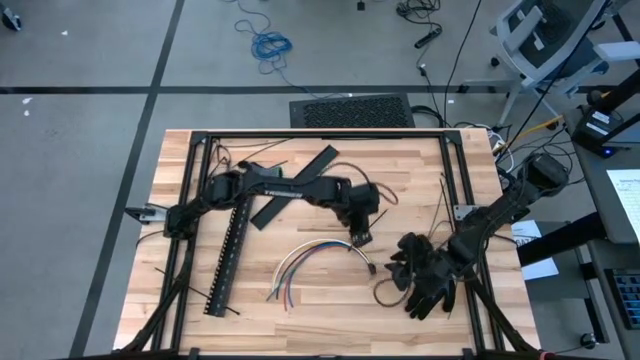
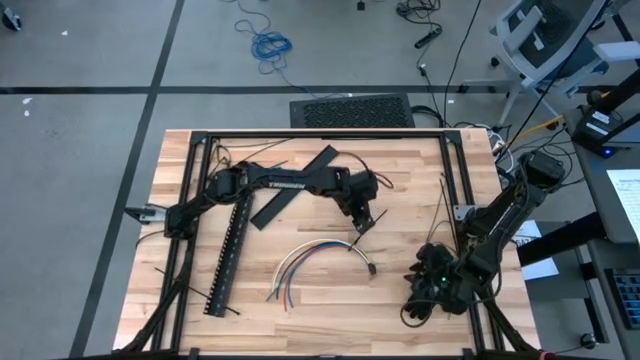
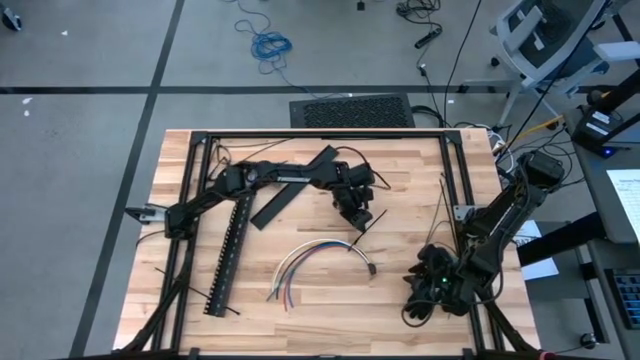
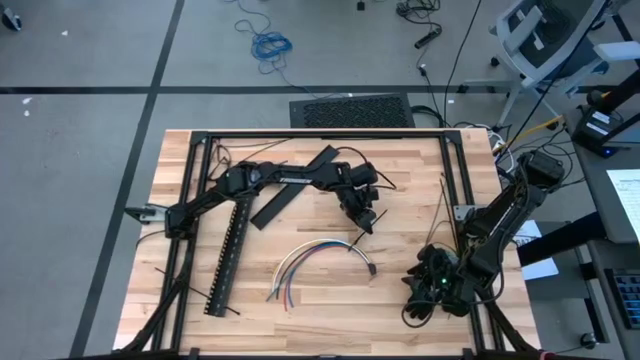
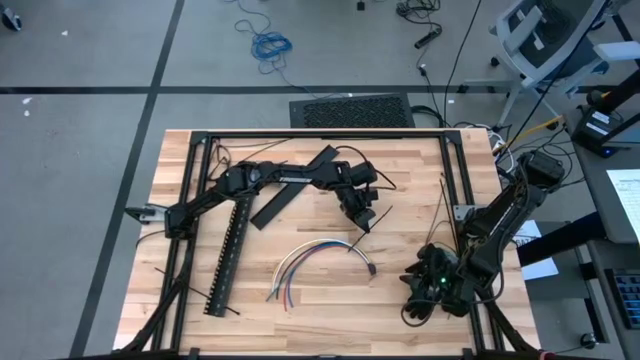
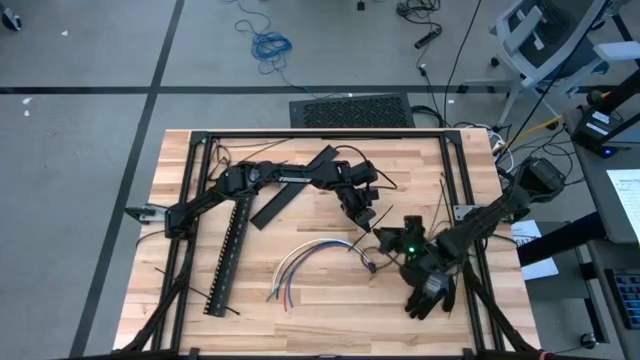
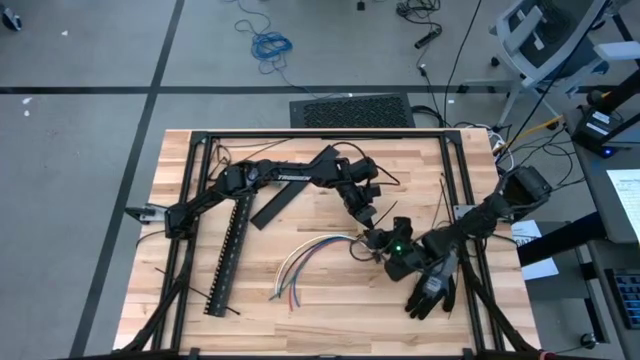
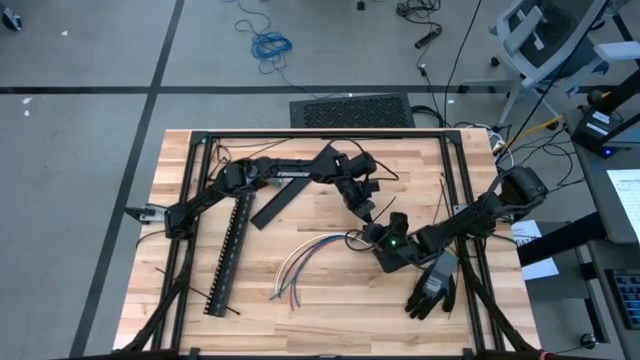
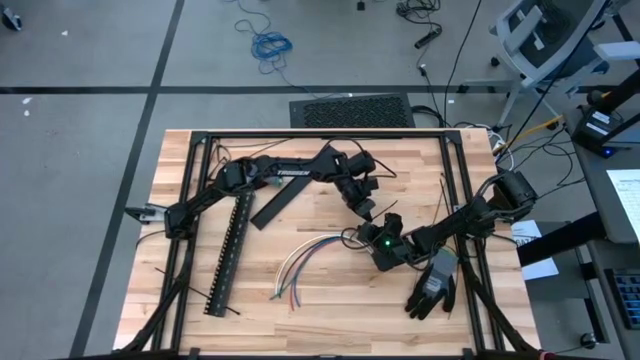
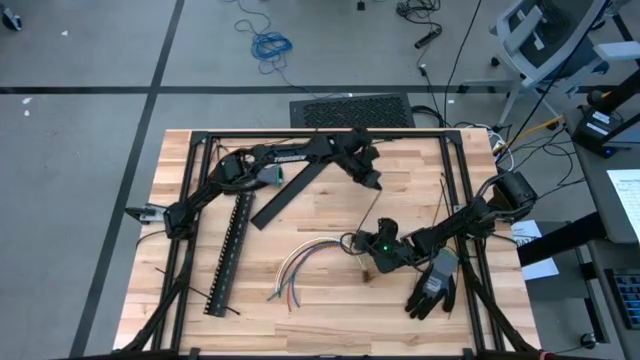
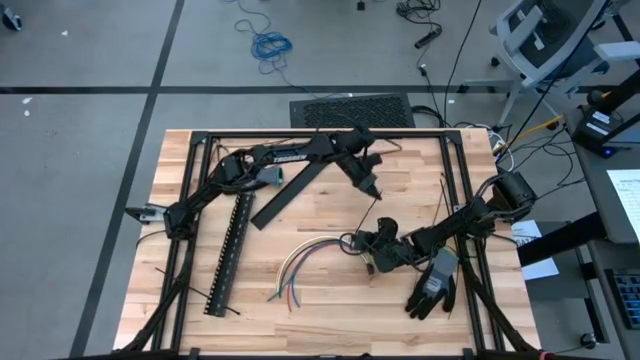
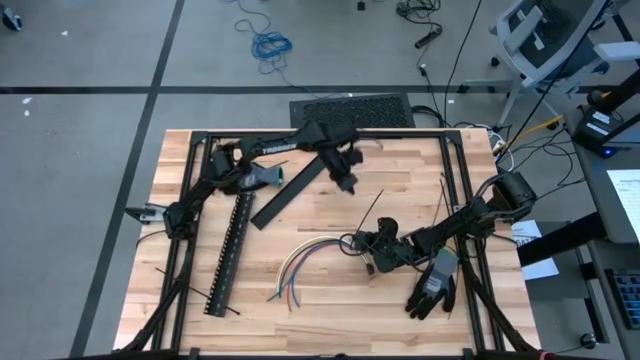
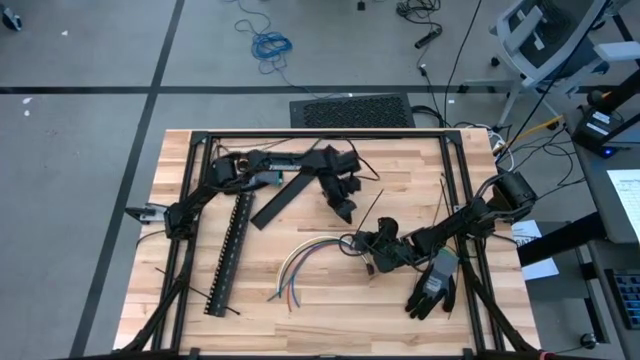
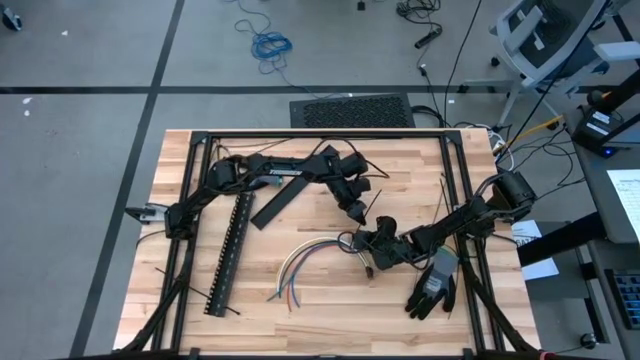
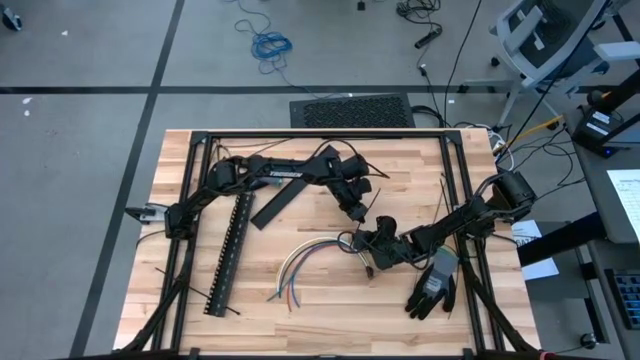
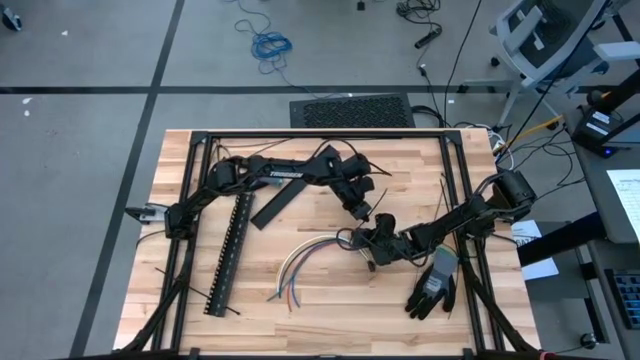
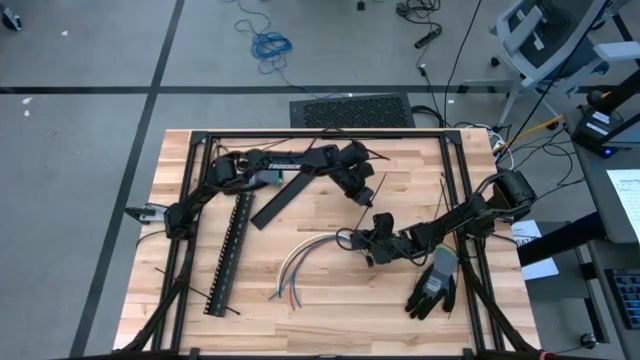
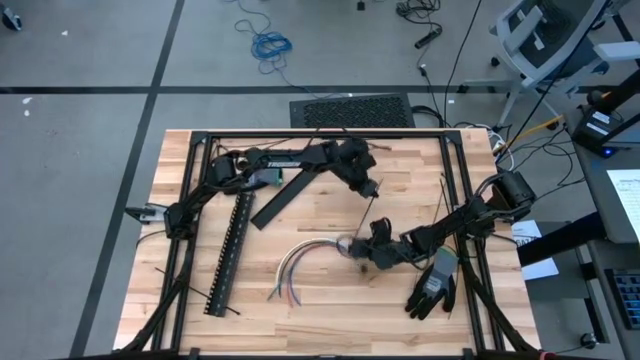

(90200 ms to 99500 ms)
Task: Ziptie cables
Wrap the cable wires with a black zip tie

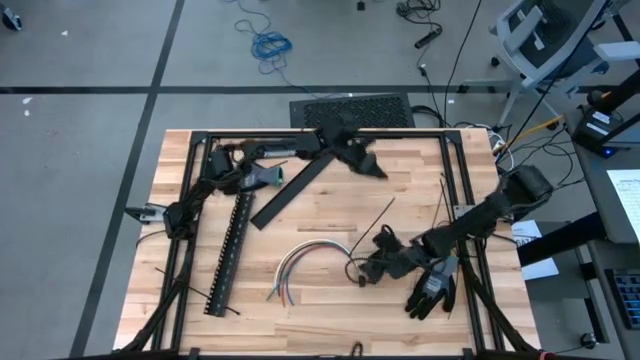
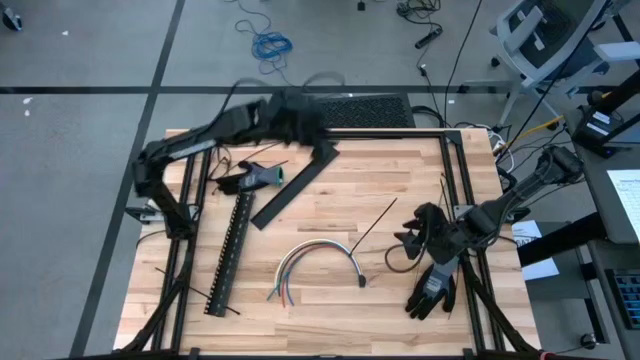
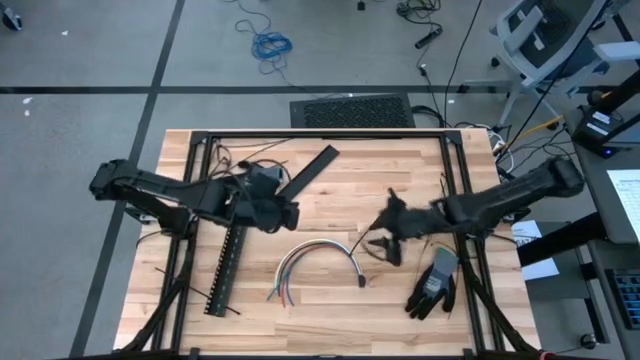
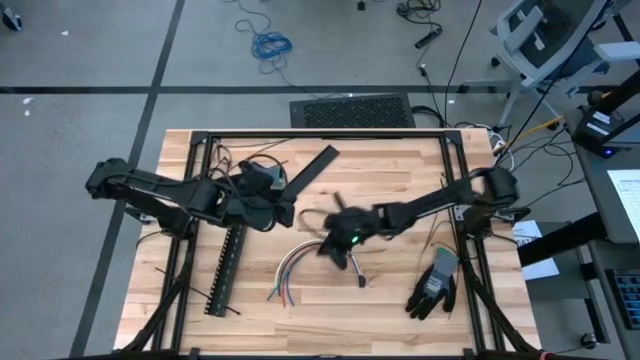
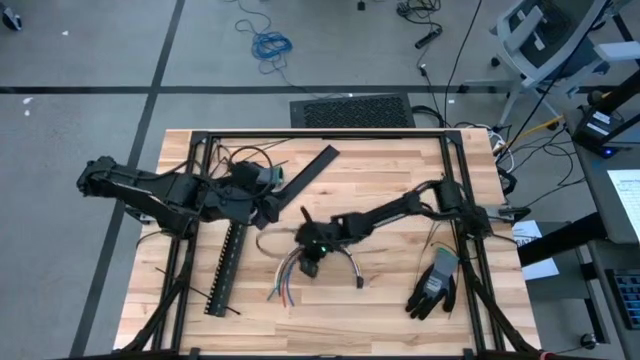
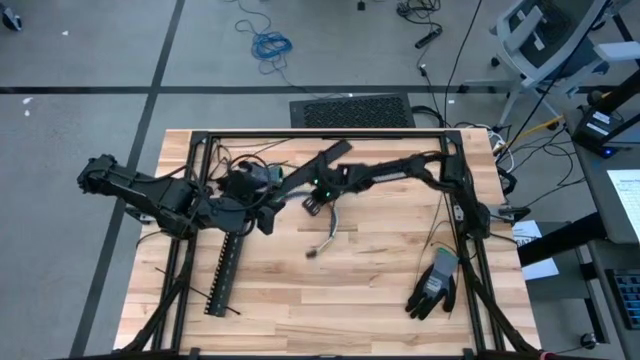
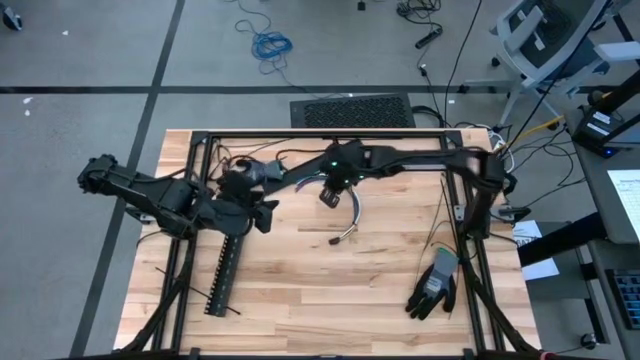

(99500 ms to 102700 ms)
Move the cable wires to the top center of the table

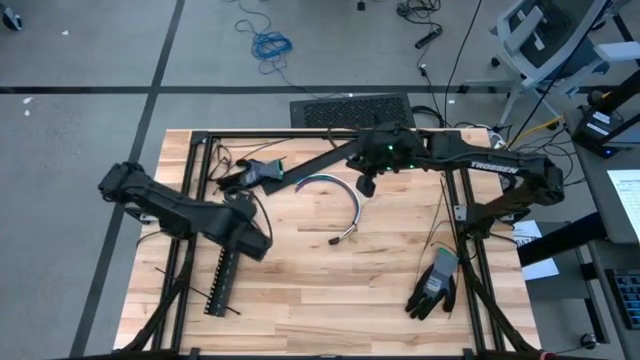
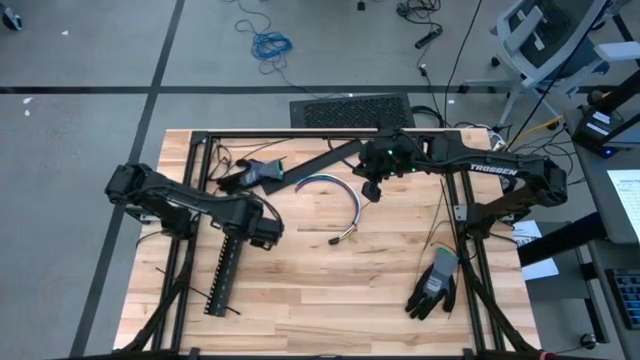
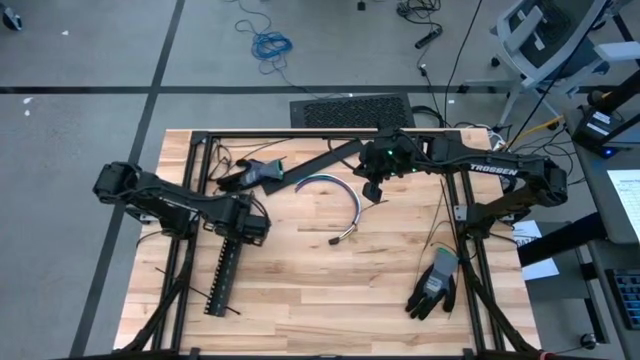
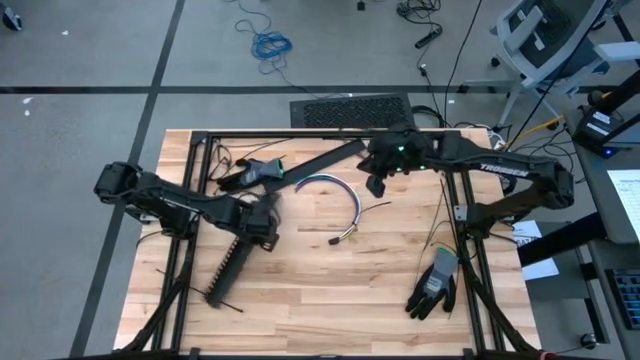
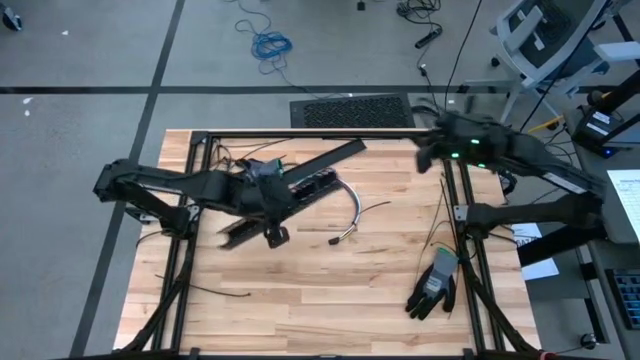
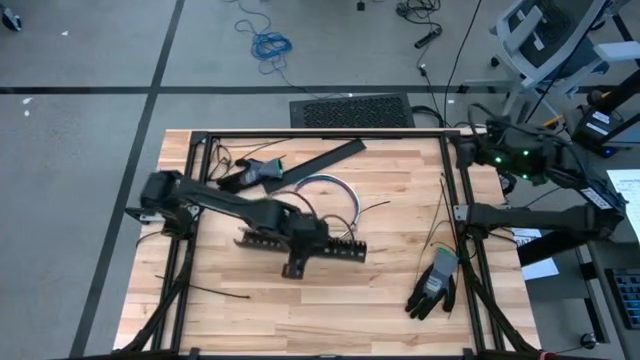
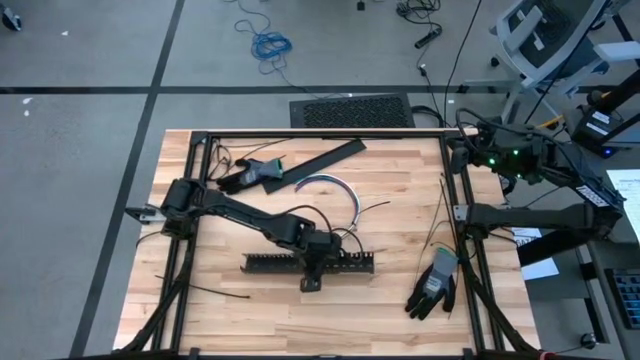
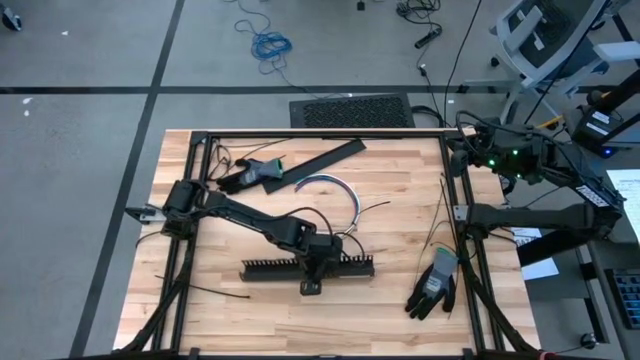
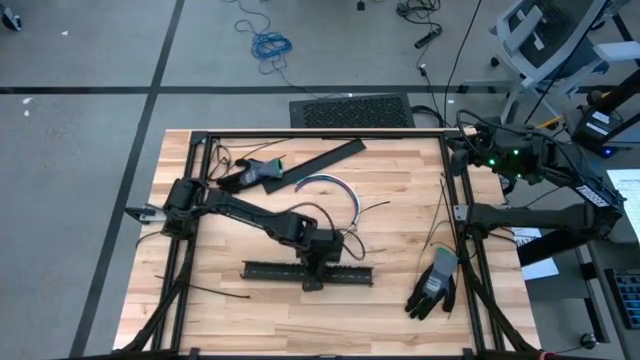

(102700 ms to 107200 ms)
Move the cable duct to the center of the table

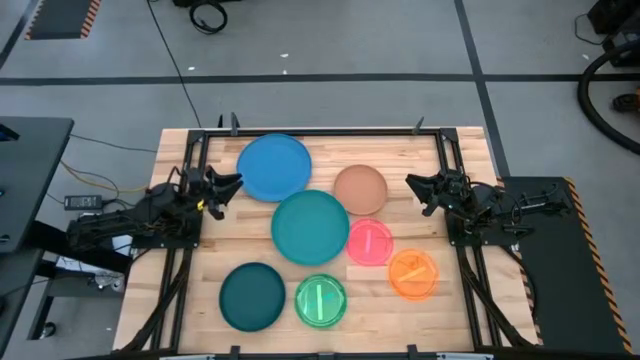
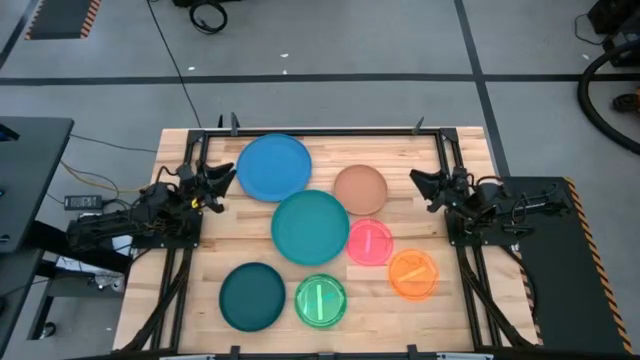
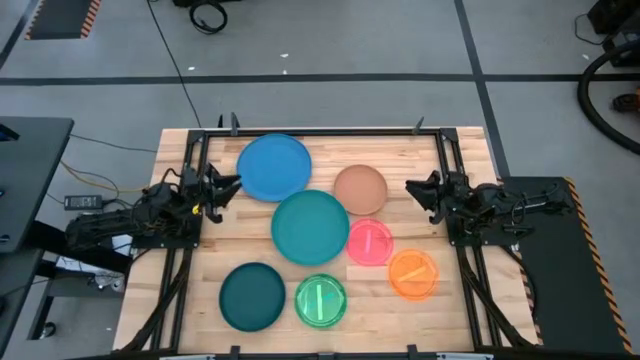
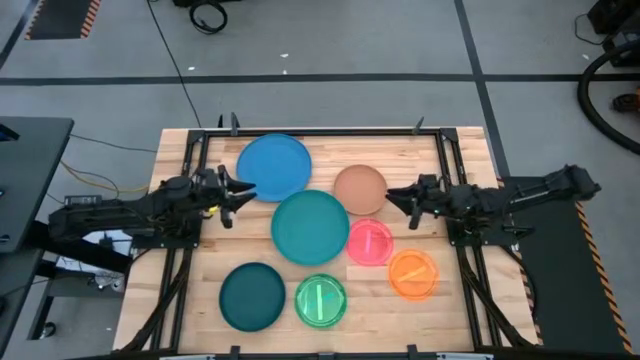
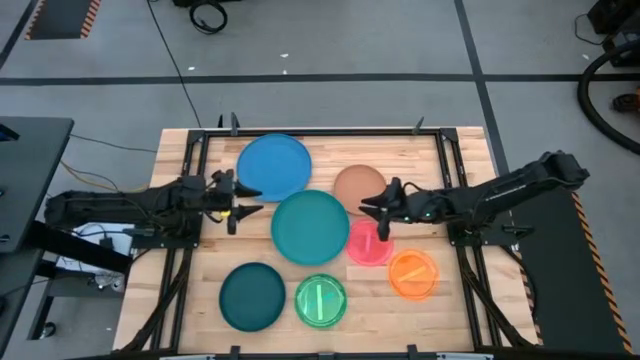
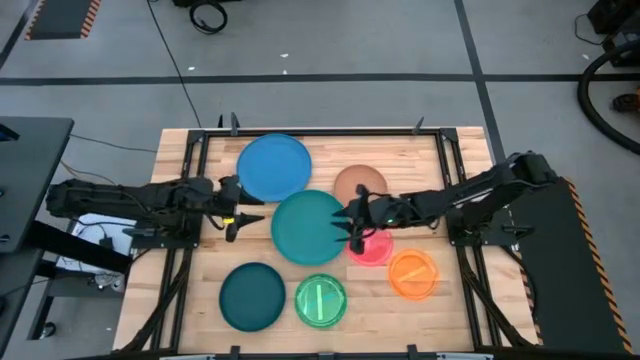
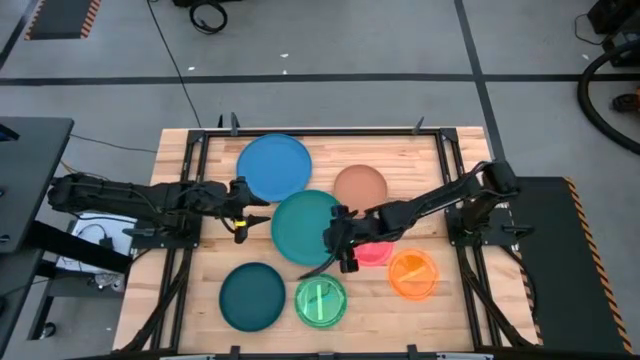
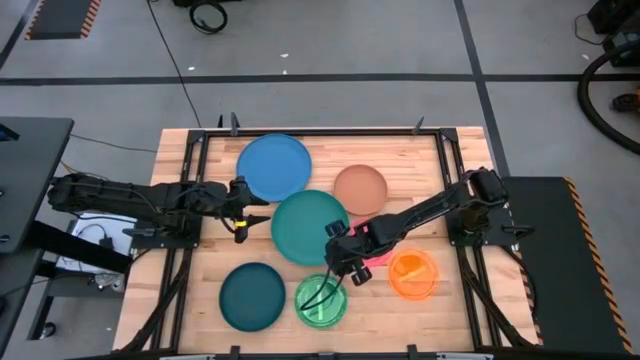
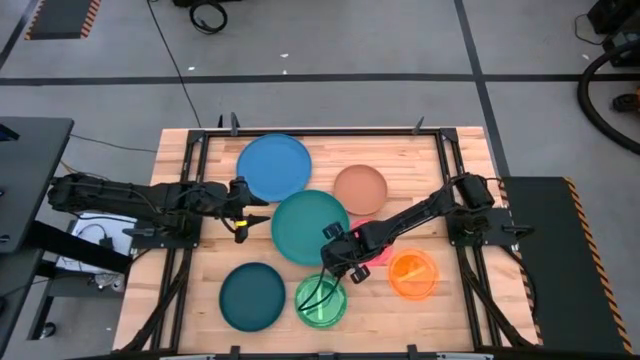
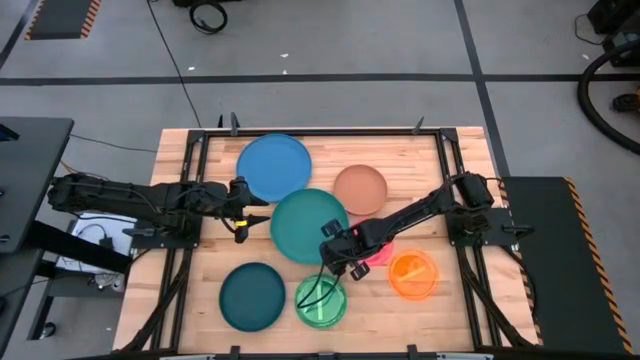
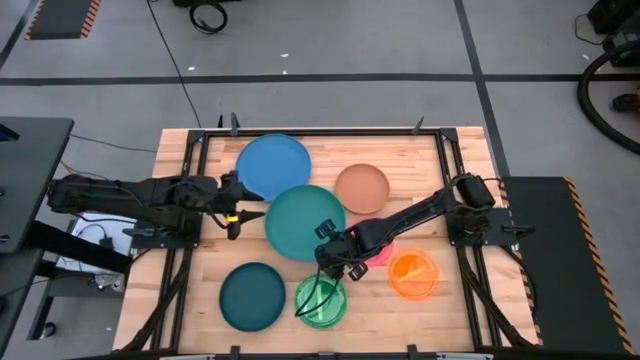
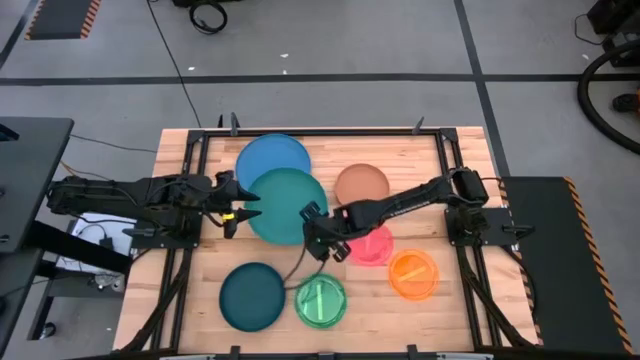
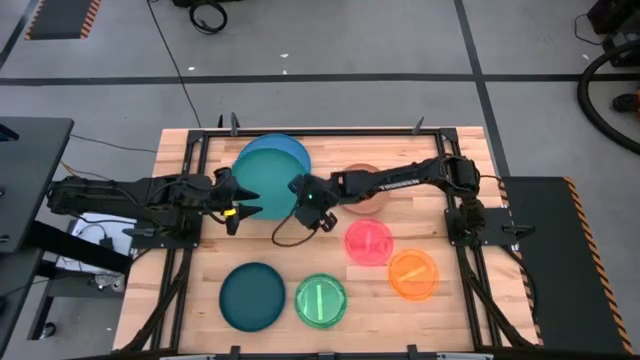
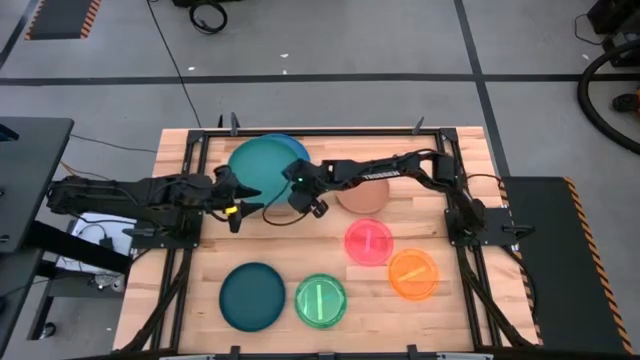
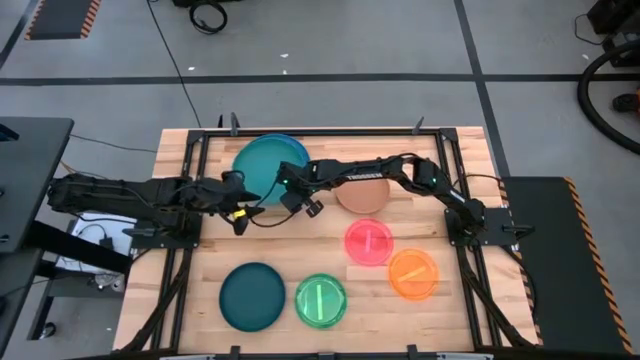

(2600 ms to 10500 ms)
Task: Stack plastic plates
Stack the green plate on top of the blue plate
